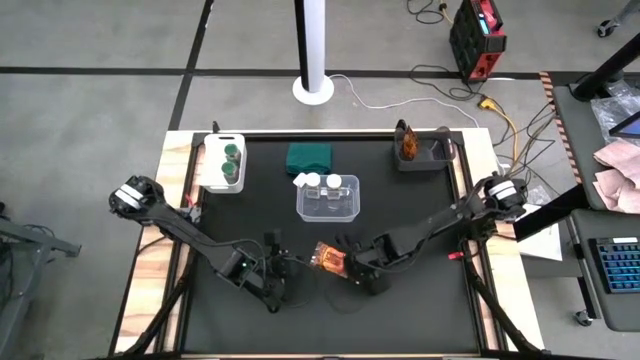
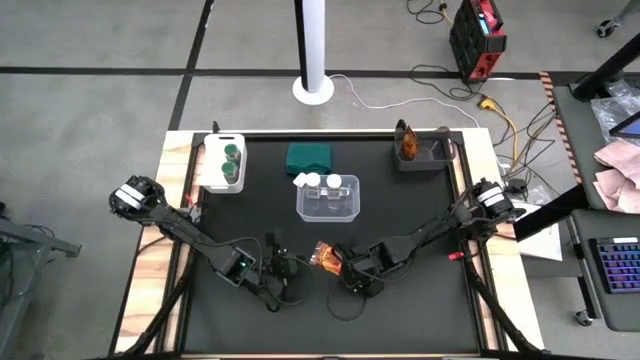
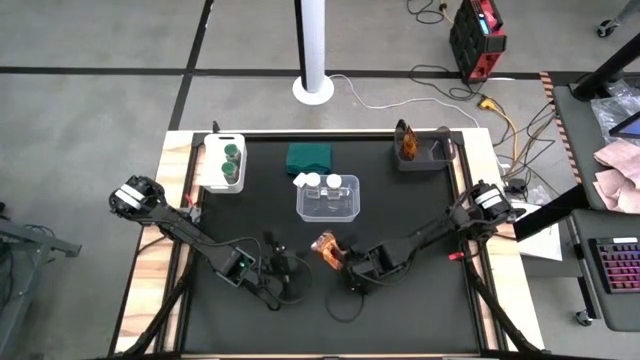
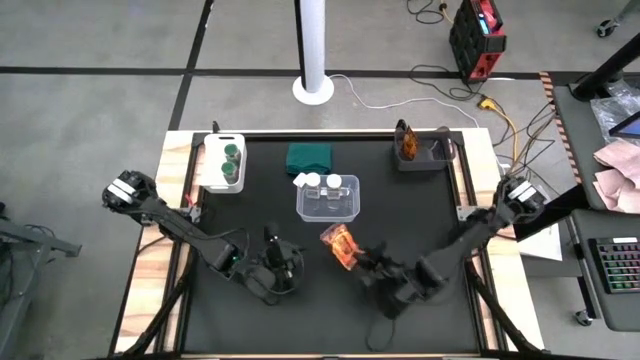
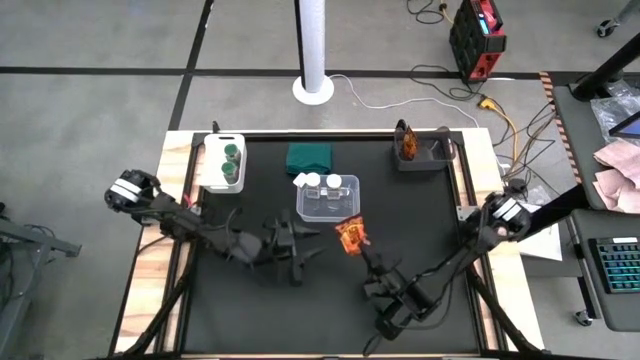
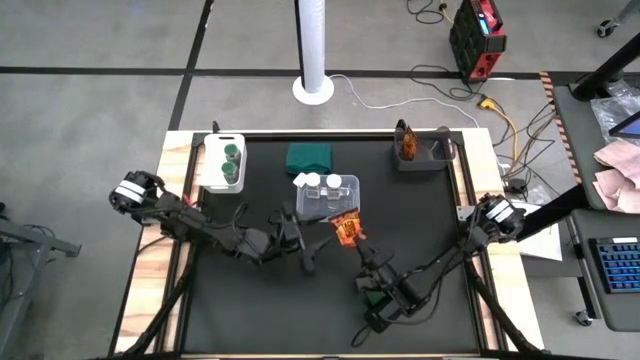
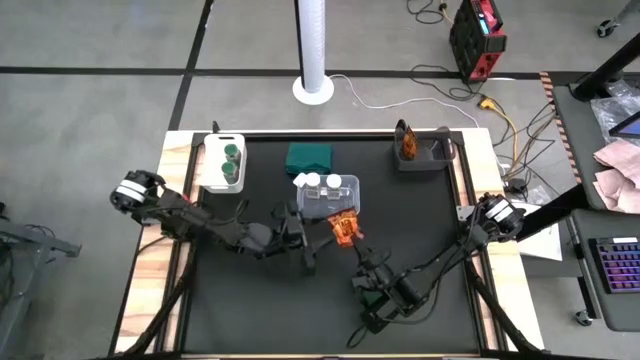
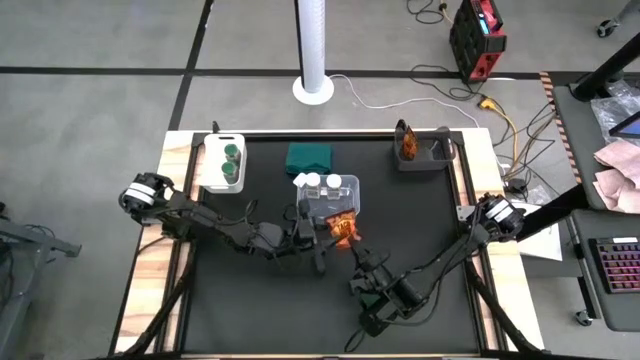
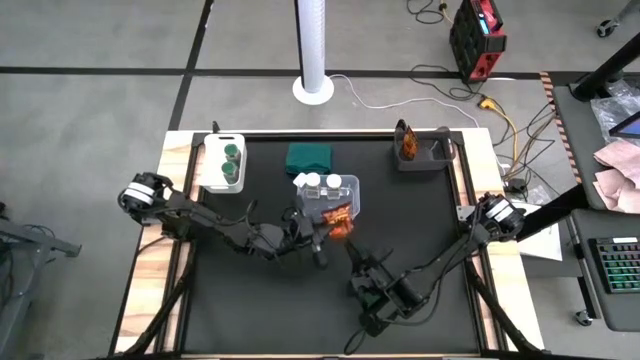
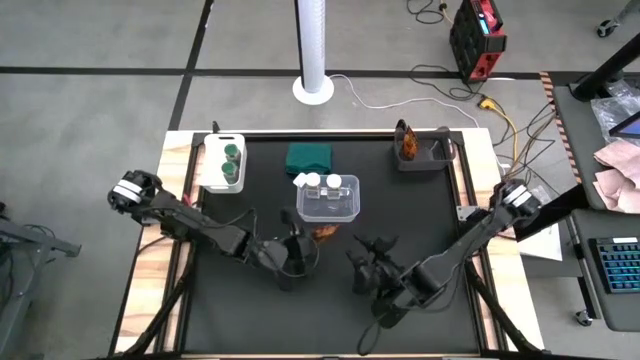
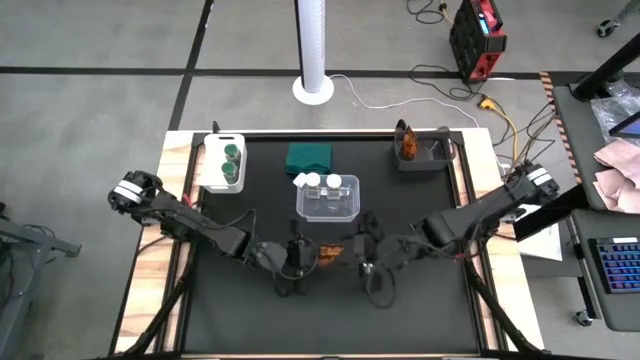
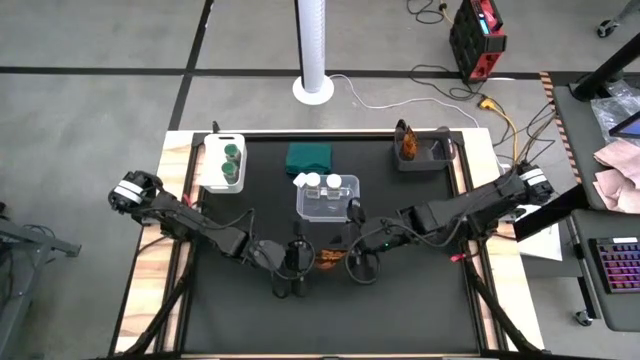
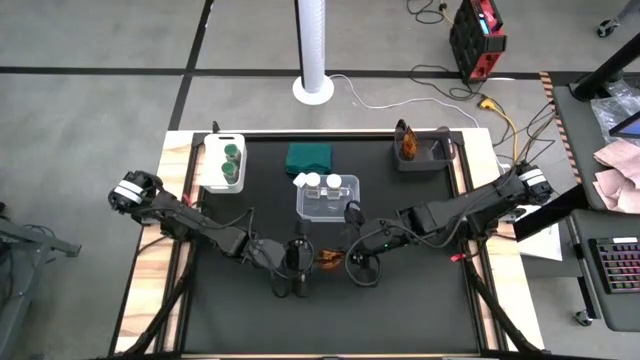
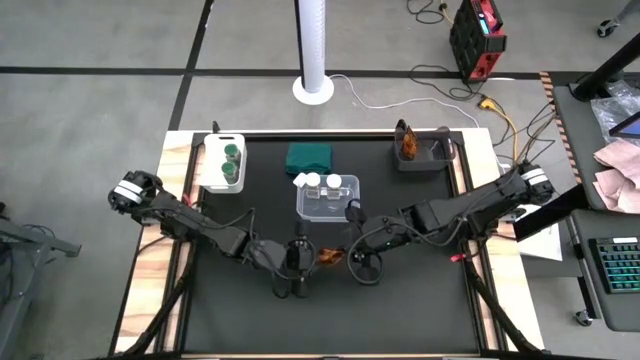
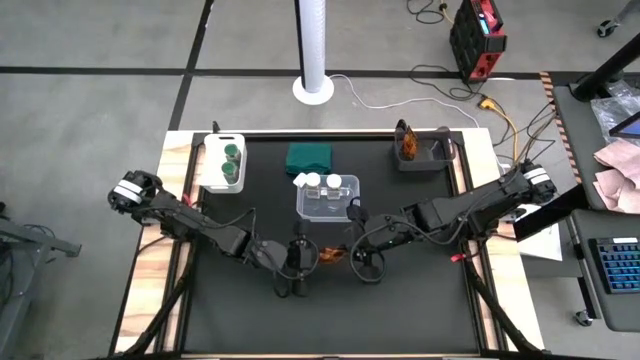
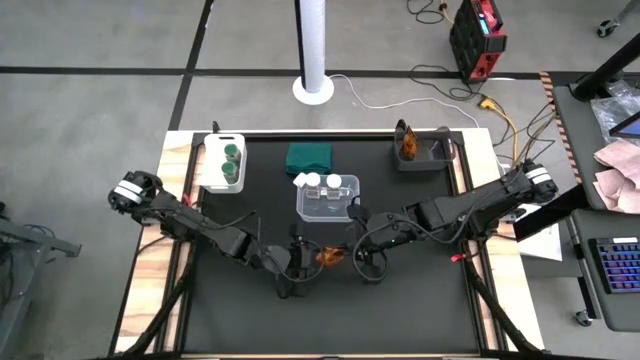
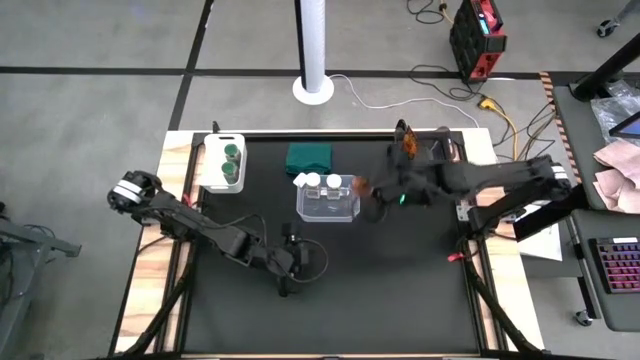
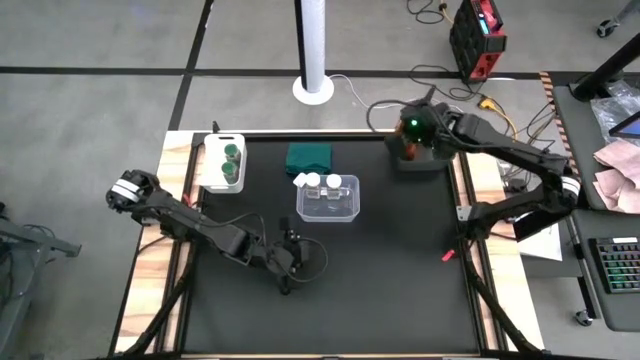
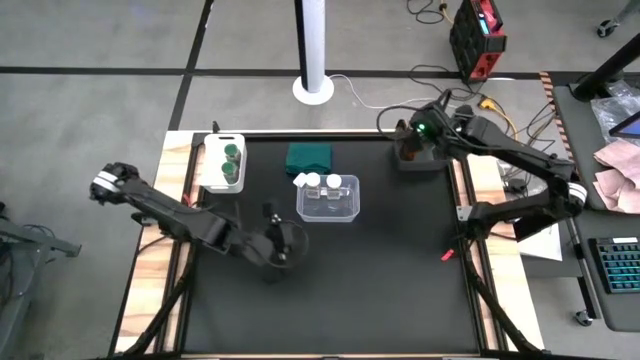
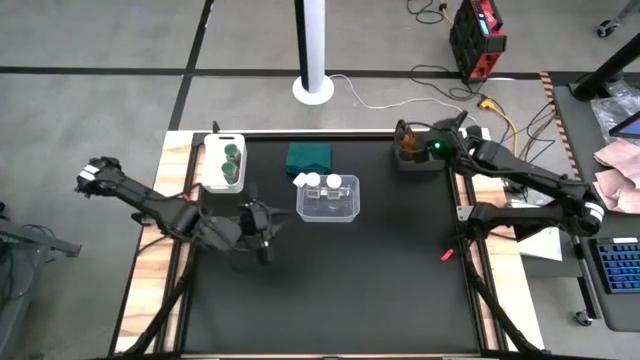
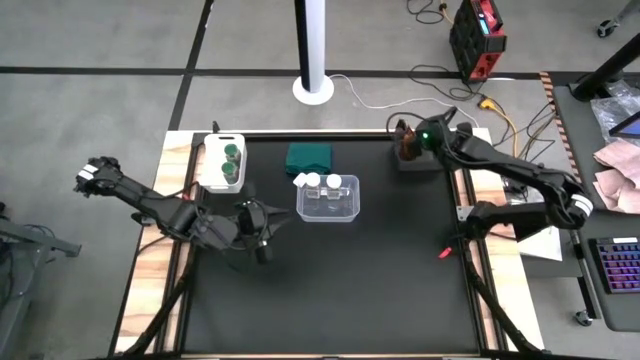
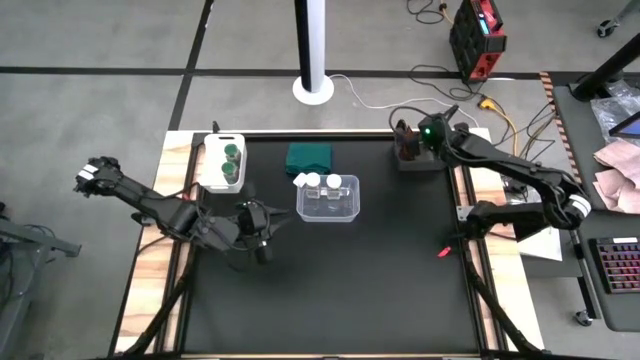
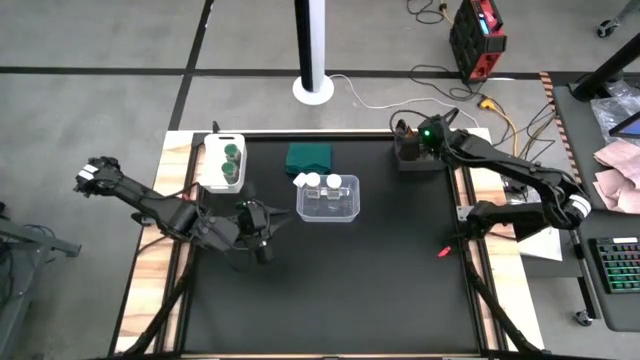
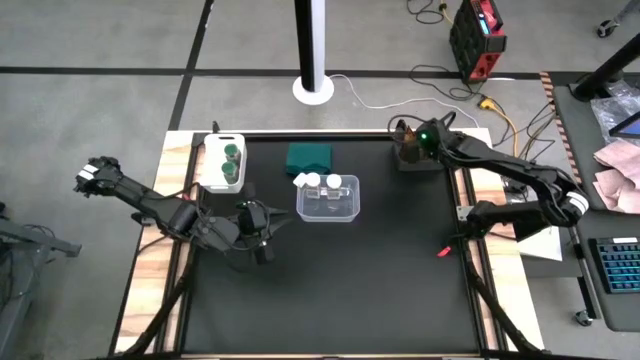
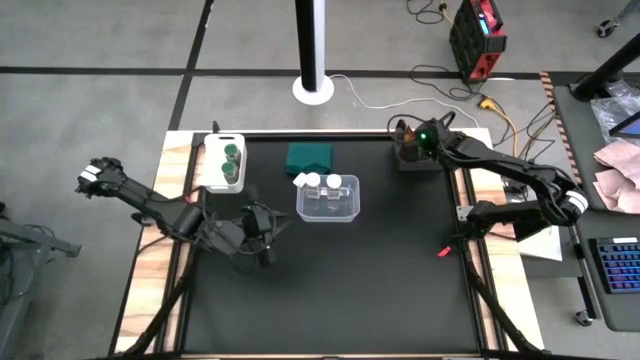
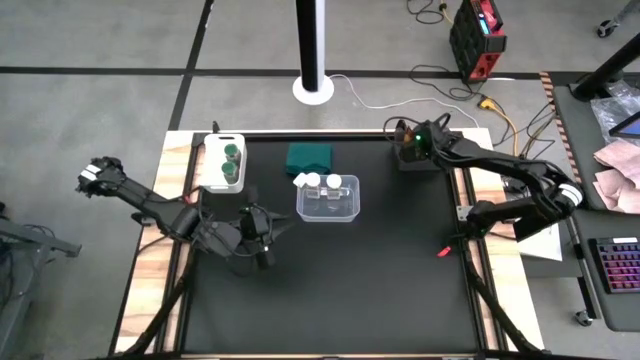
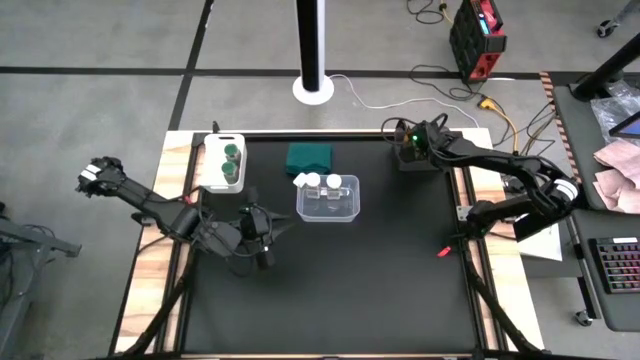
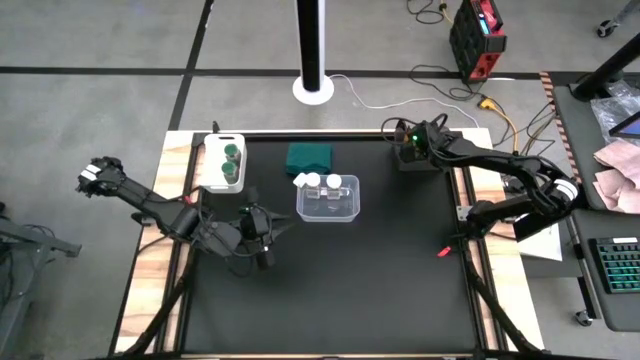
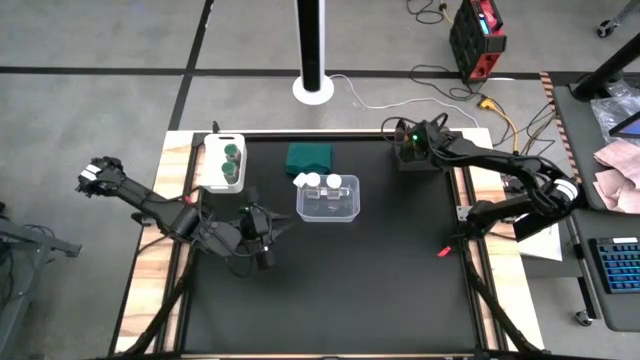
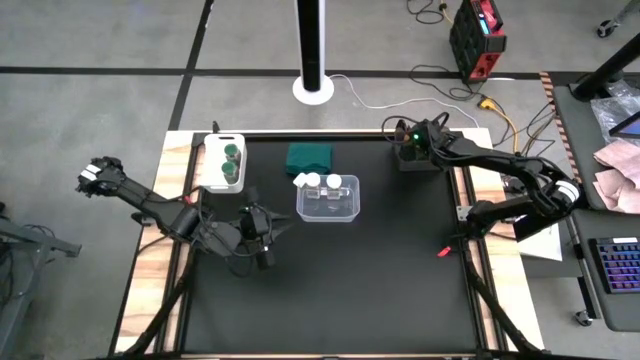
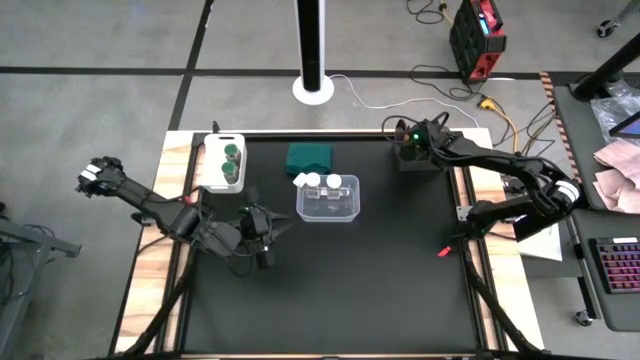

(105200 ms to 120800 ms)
Task: Sort spices by type
Put the spice pack into the black bin

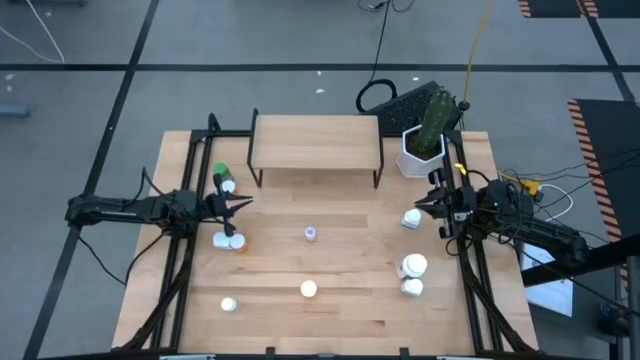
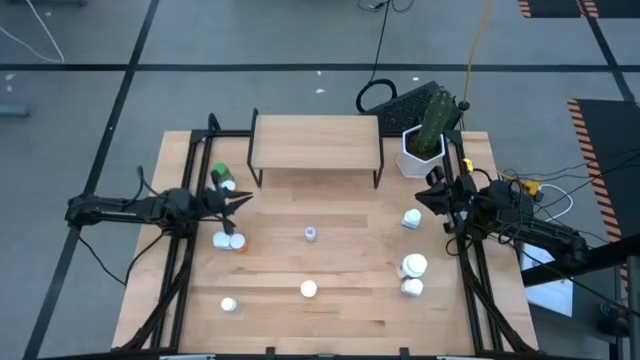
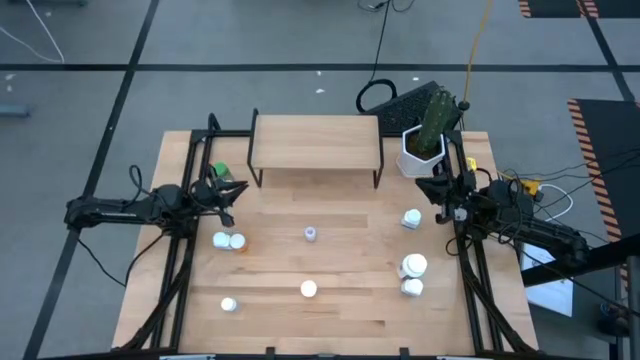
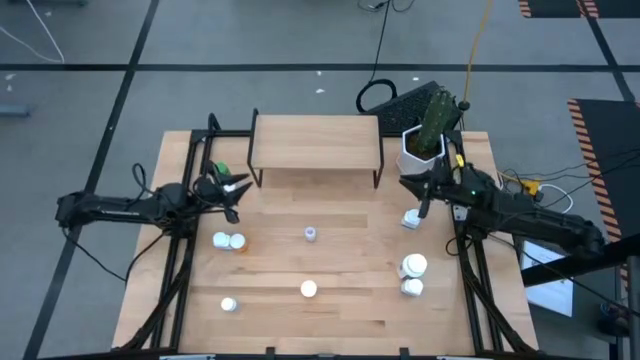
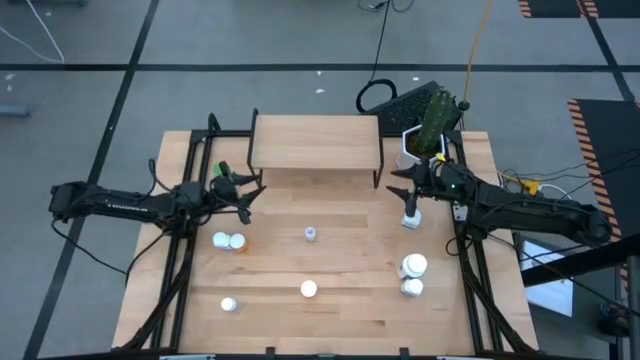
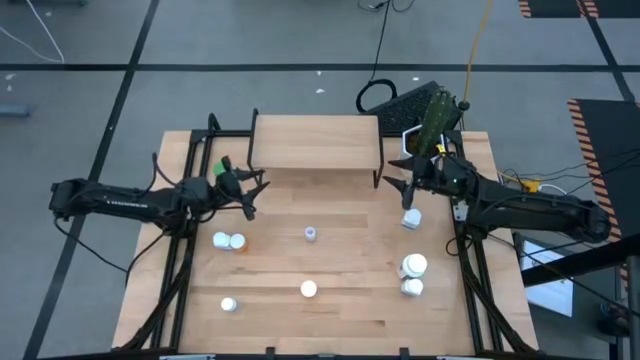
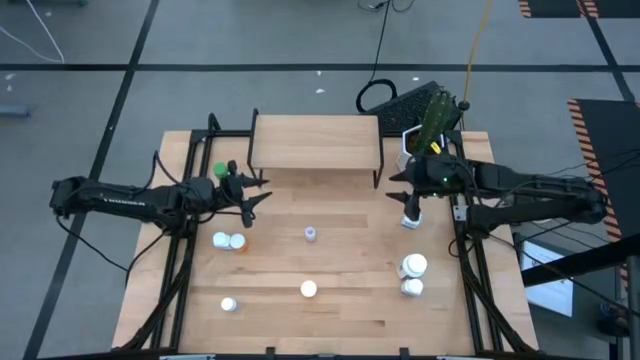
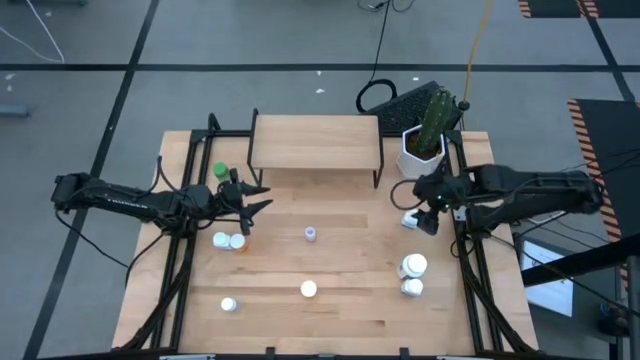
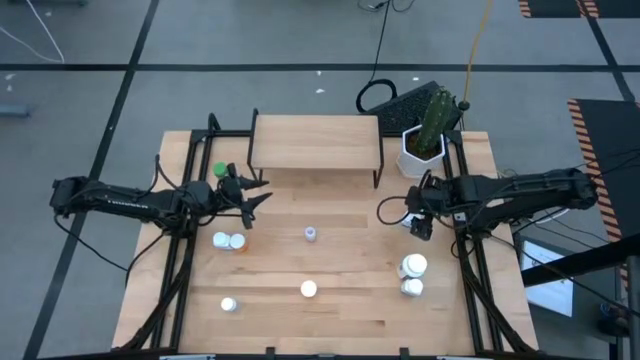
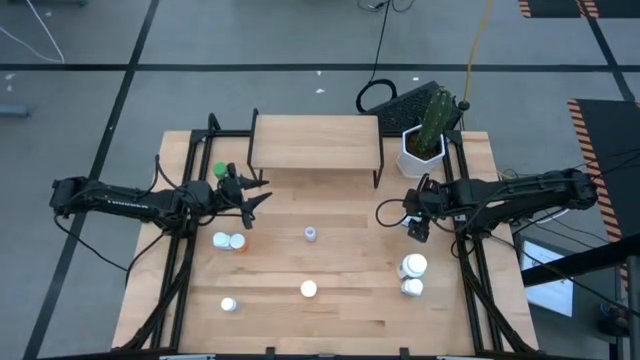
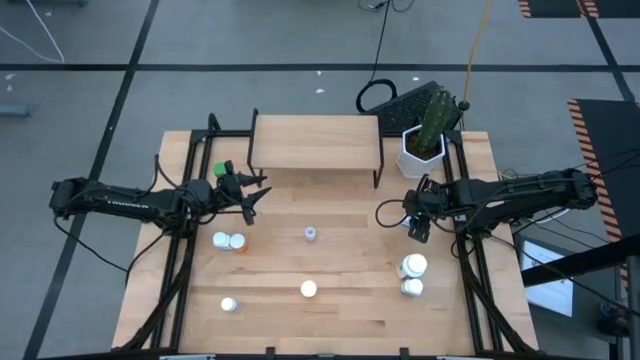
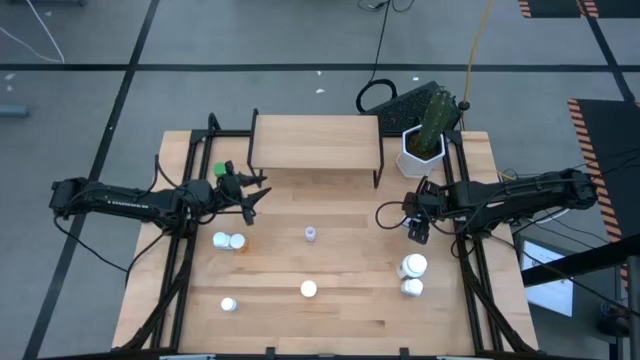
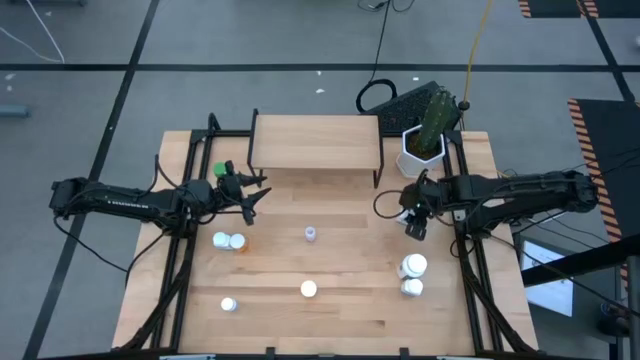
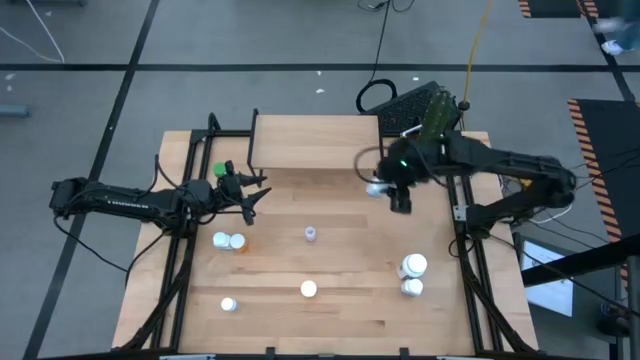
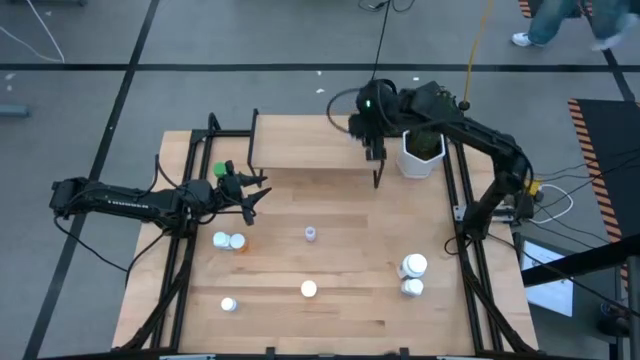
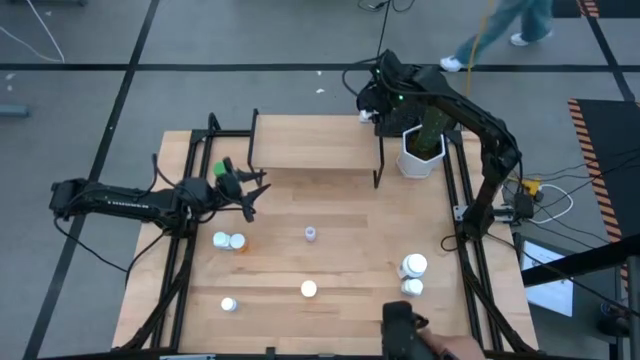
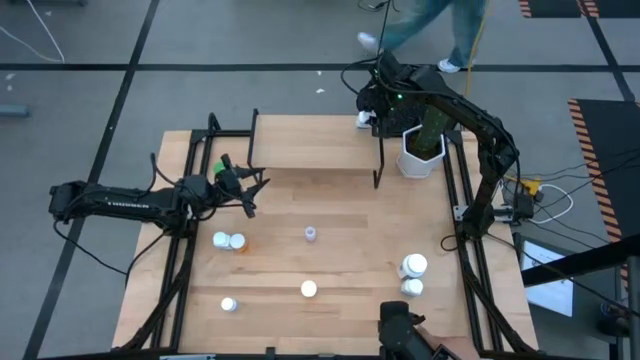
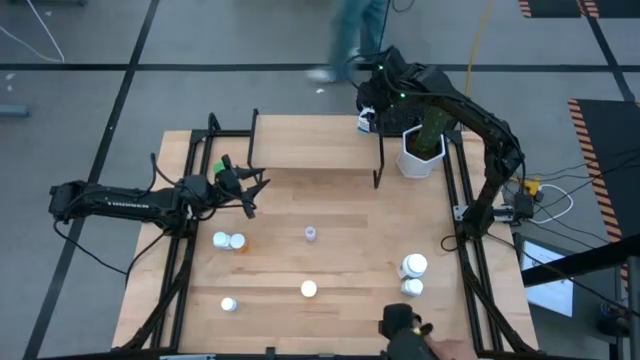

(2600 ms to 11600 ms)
Task: Pick and place medicine bottles onto shelf by color
Put the top white and blue medicine bottle on the shelf
